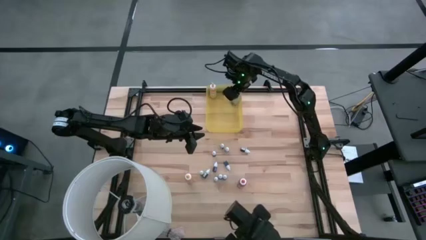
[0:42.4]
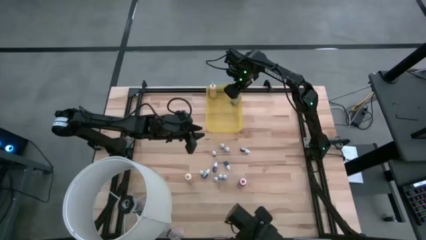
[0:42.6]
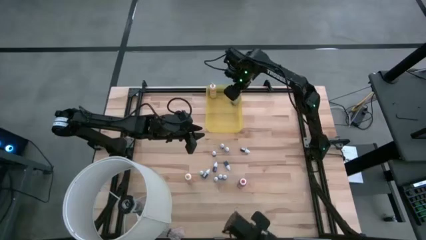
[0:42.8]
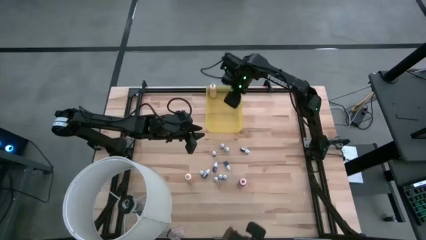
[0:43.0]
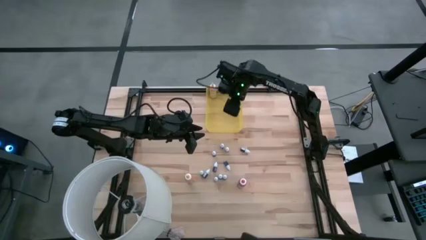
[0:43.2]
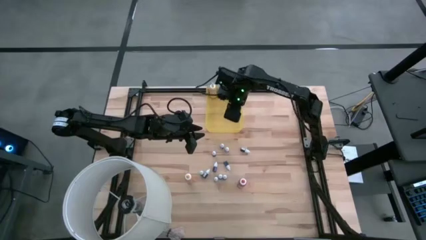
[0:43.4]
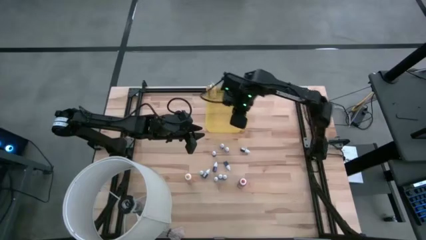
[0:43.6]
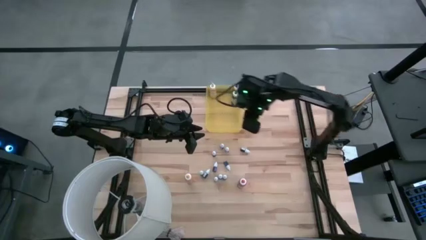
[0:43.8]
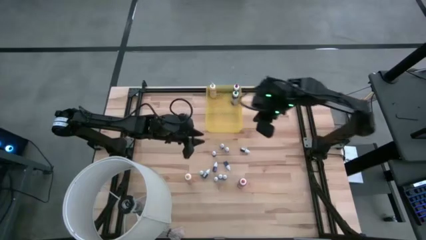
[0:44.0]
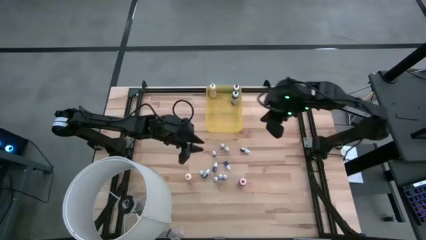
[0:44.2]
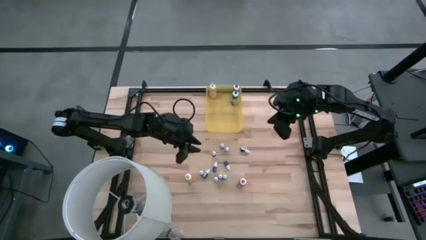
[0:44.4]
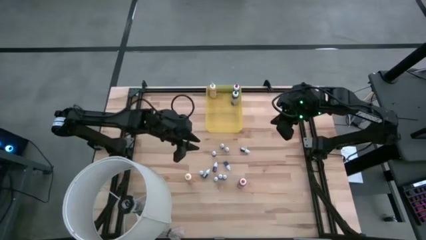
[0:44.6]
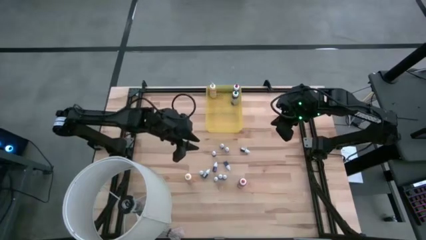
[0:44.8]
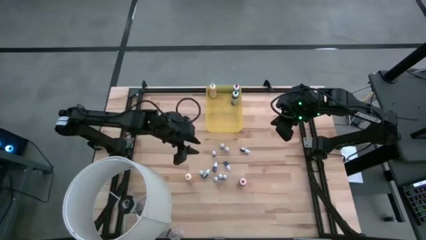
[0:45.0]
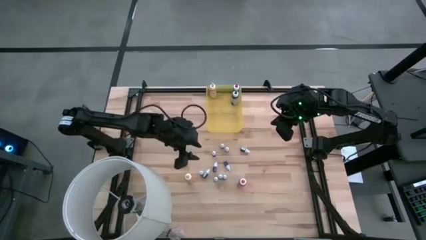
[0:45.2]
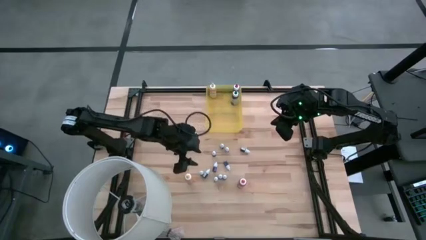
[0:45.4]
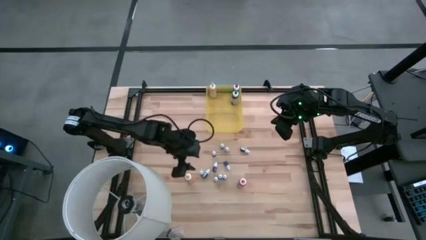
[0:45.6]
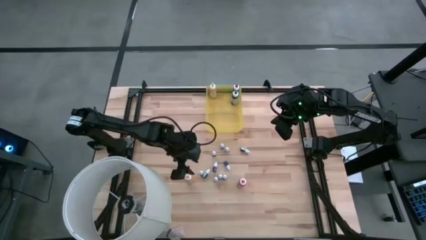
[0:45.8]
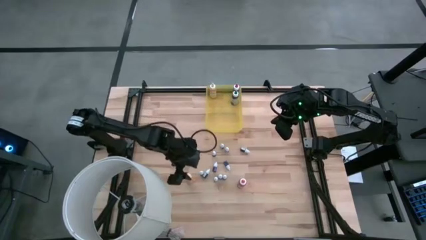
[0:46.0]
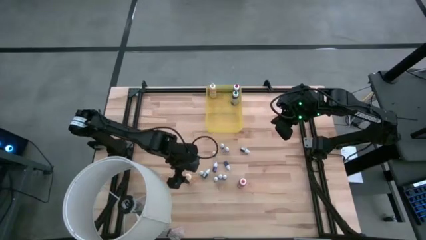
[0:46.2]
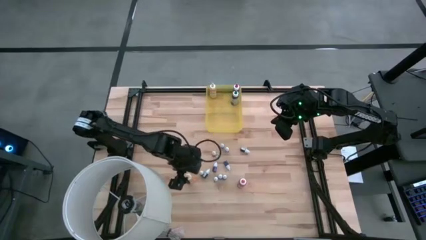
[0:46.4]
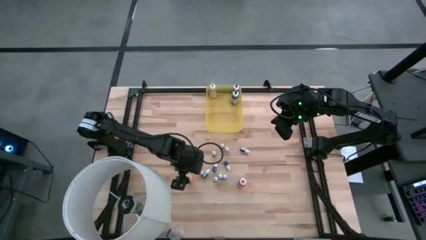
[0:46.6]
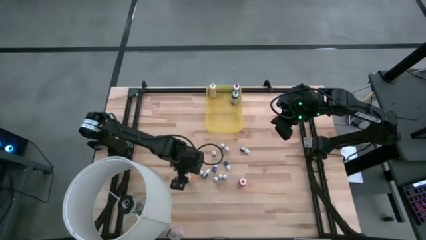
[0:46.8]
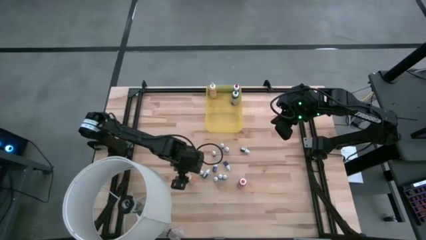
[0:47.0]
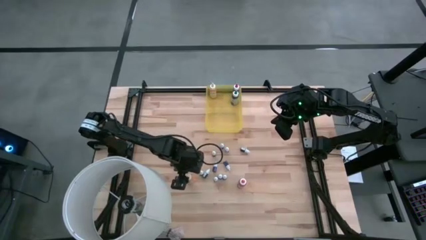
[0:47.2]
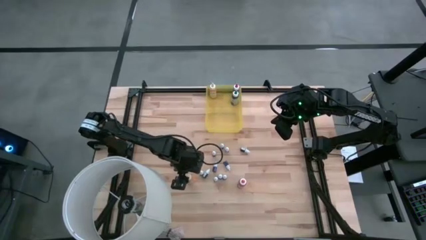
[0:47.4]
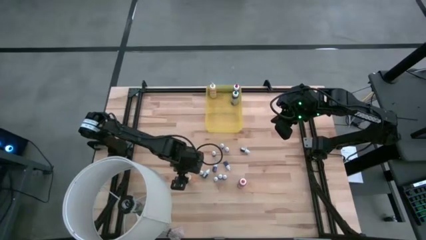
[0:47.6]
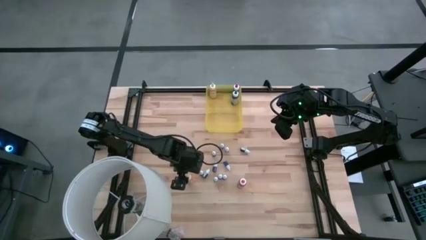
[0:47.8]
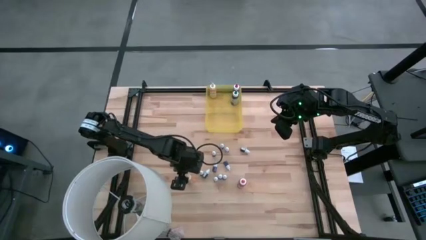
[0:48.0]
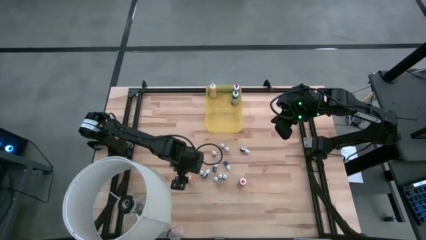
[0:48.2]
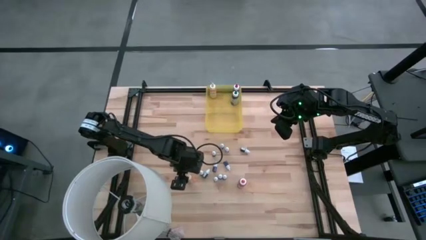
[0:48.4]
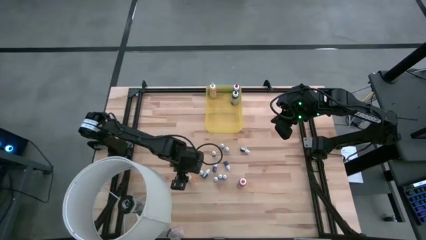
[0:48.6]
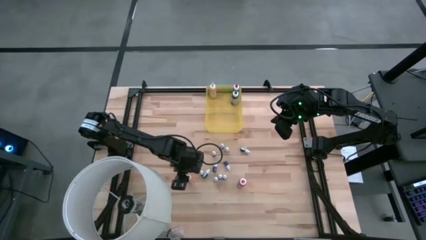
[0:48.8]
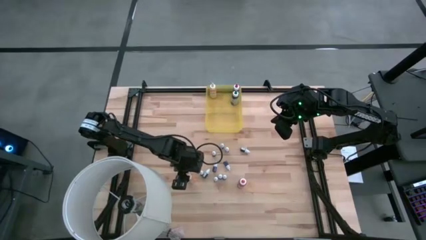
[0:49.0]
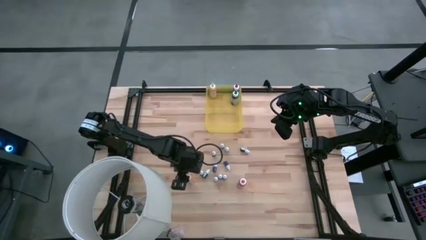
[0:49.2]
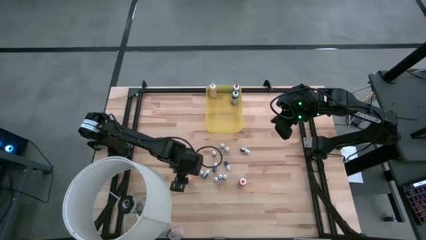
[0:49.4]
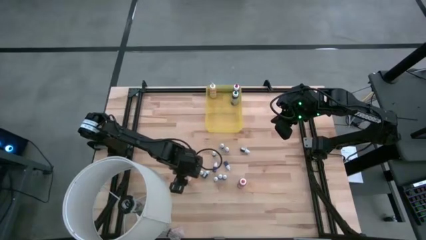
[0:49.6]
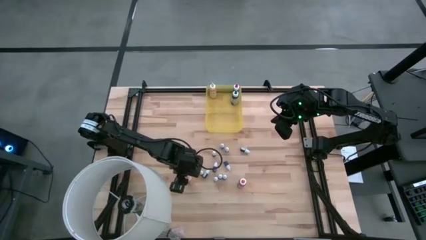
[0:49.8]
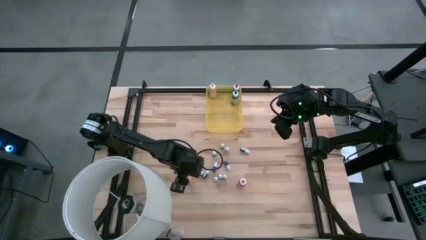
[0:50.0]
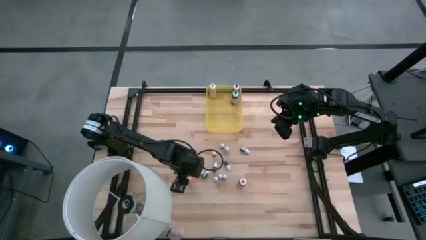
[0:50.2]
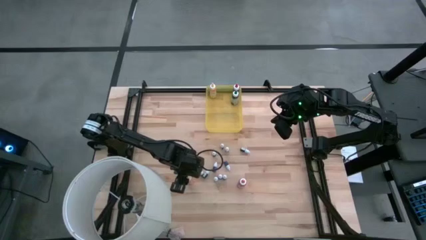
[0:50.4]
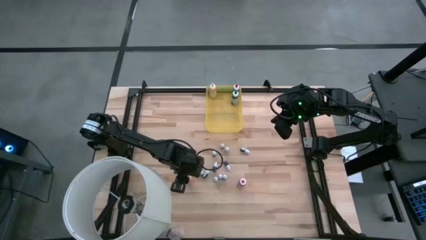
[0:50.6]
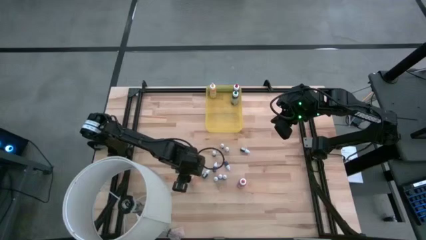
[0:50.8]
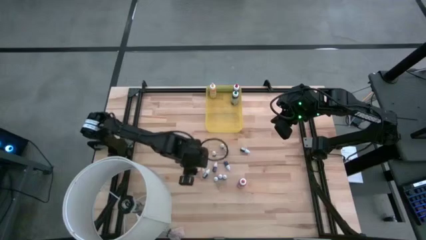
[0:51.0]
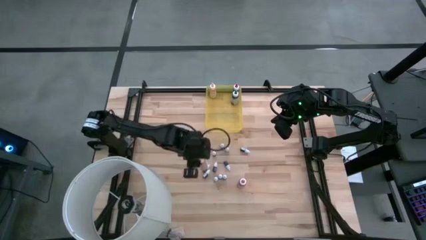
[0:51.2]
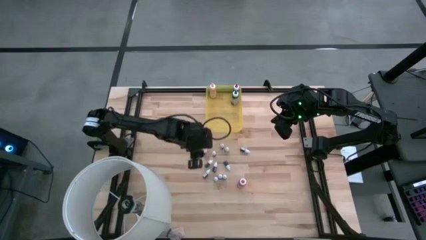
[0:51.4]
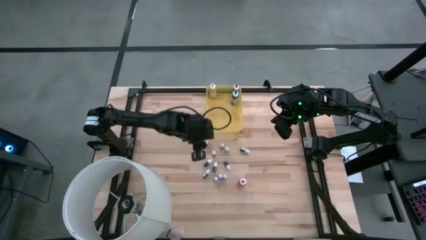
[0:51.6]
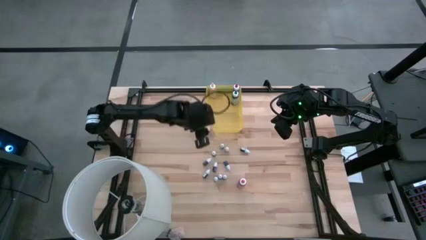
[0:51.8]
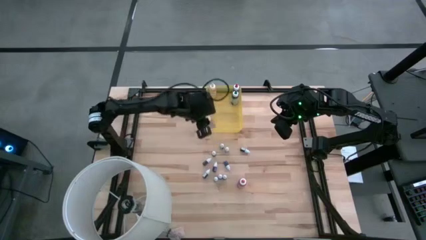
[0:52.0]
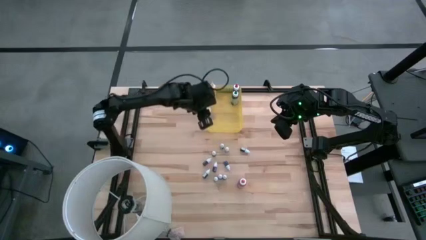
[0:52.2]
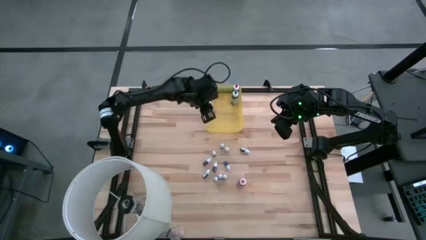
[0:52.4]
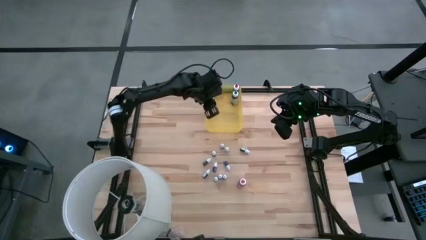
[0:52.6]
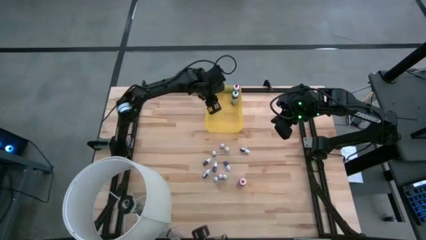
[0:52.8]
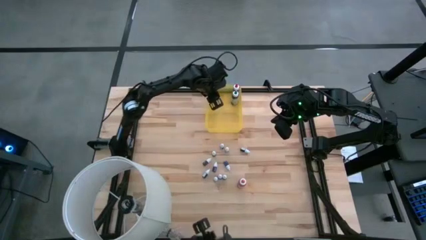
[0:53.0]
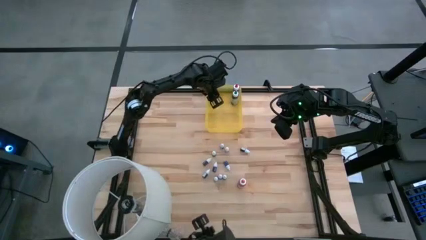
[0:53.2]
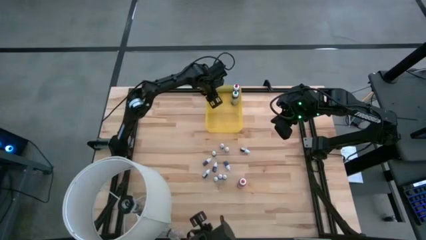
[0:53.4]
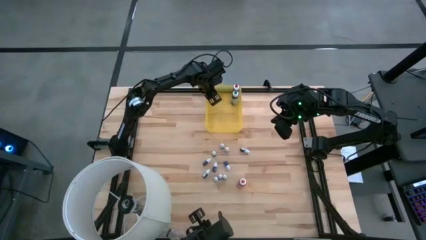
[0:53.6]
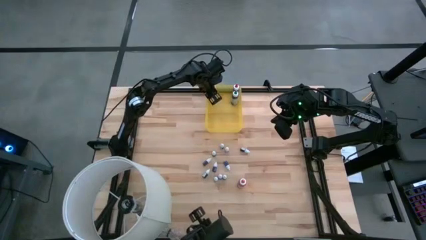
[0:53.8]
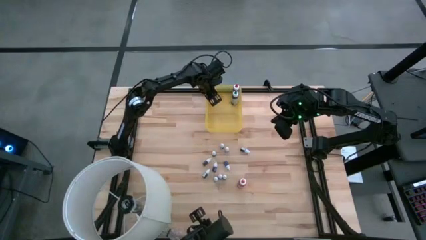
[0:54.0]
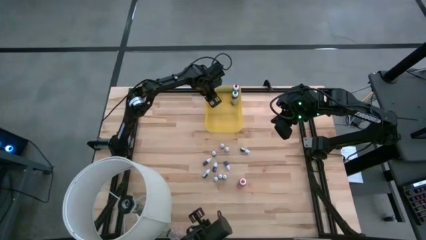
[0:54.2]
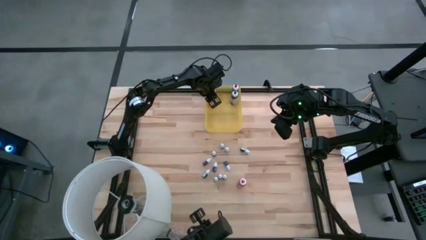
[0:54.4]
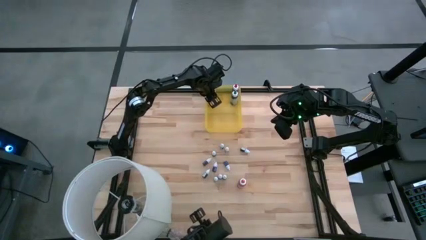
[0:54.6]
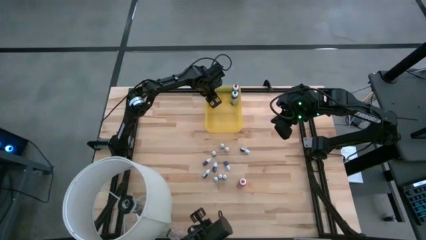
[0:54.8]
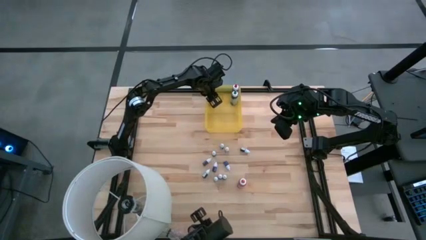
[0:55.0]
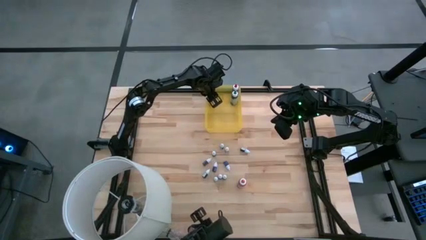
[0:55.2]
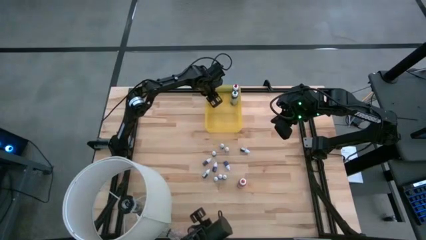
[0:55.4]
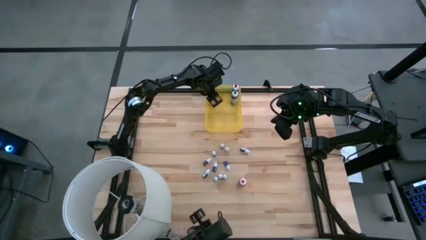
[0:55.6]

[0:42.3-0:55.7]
Task: Pick & Place food coloring
Put the large yellow food coloring bottle into the yellow container

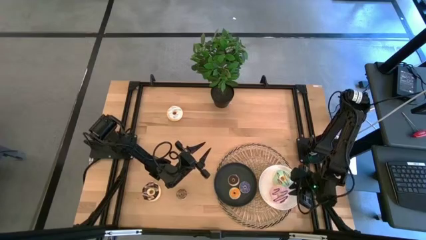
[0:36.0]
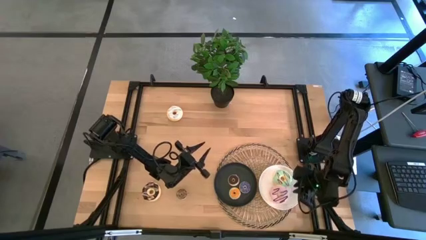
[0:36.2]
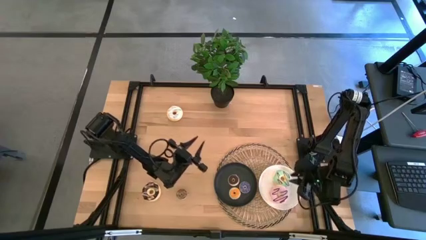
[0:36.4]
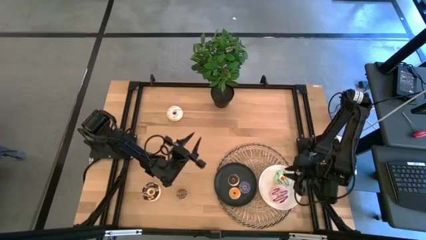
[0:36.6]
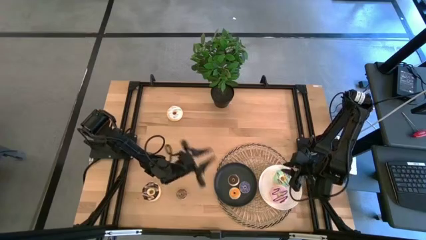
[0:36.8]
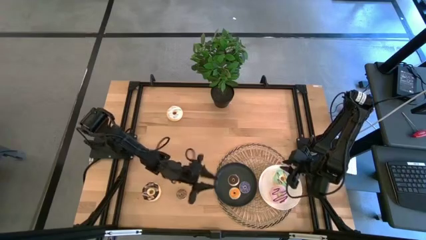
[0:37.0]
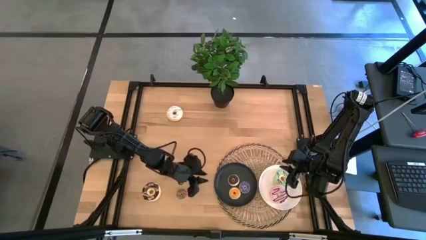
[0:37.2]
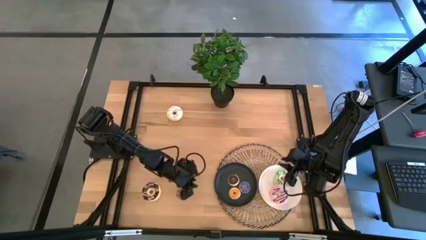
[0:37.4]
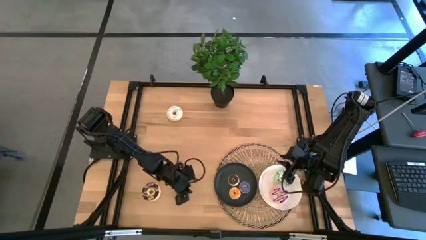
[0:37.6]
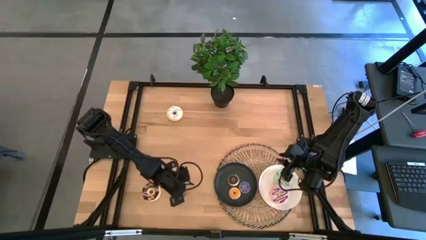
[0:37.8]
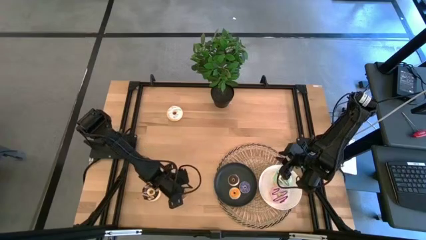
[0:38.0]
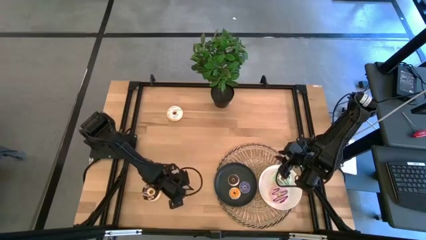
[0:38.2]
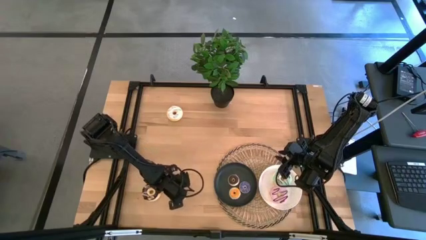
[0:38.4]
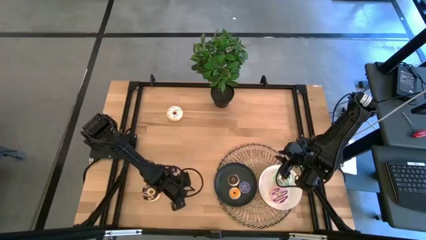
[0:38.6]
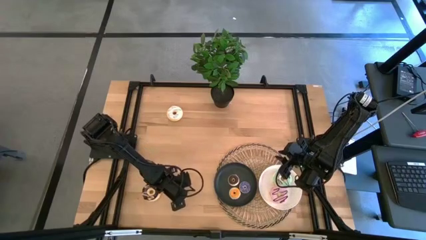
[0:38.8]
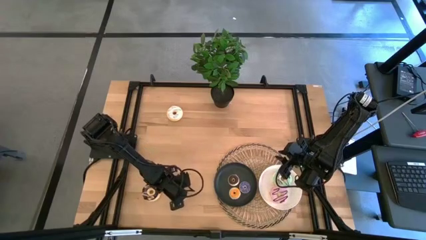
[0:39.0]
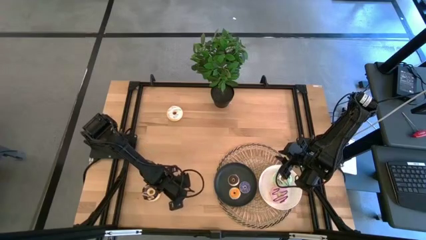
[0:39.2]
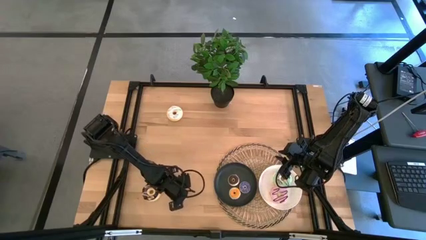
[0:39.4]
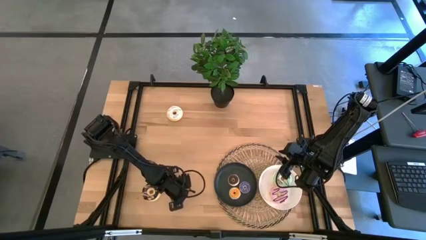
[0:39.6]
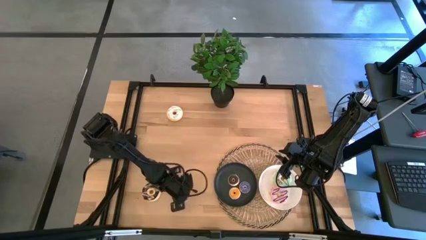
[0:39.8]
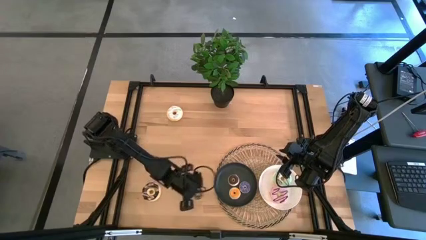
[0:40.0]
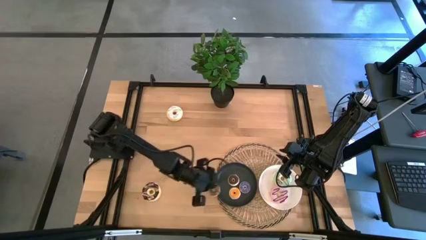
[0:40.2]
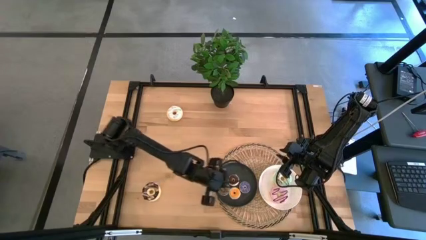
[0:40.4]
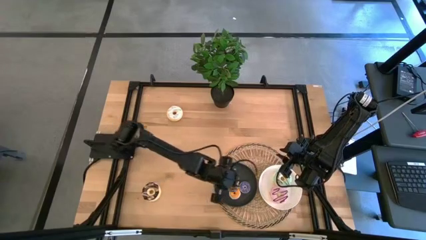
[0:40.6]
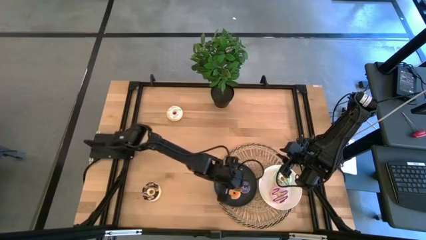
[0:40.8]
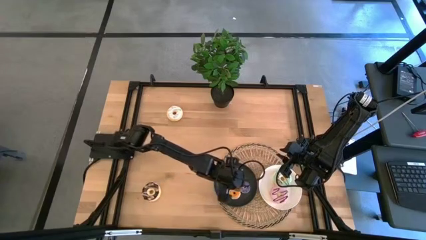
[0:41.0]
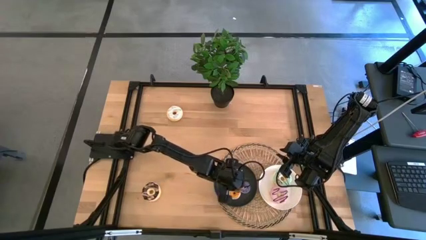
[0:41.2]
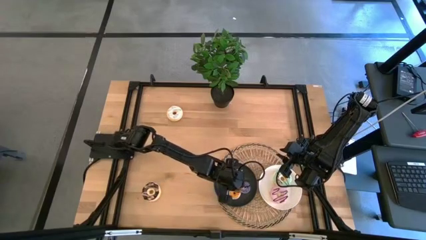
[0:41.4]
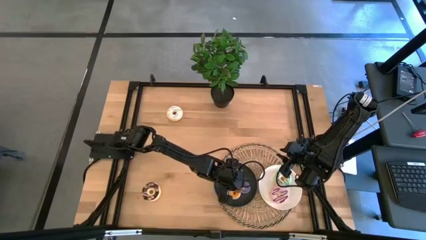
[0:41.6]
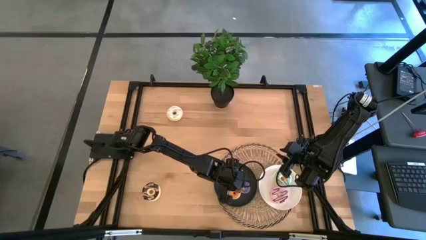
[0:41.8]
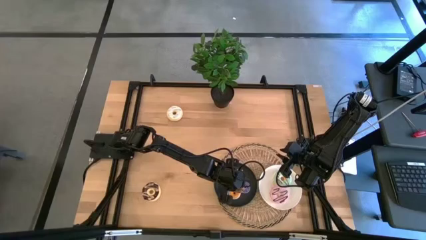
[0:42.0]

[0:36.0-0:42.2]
Task: Pick & Place donuts
Put the small brown donut on the black plate
